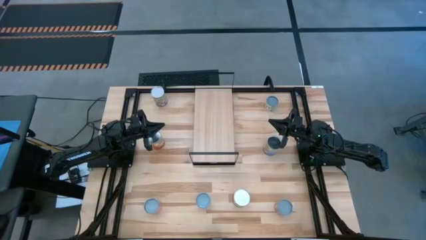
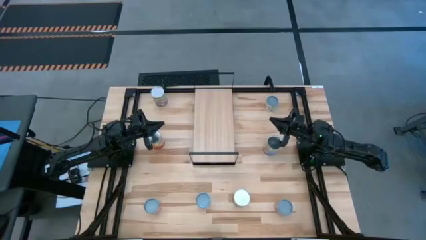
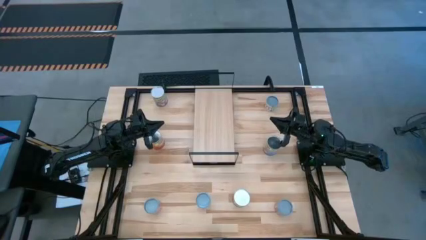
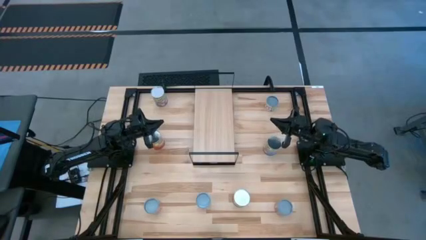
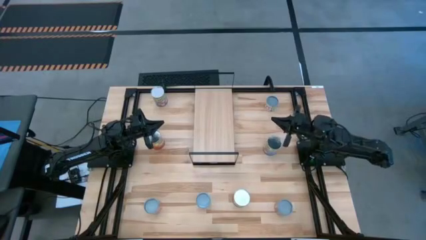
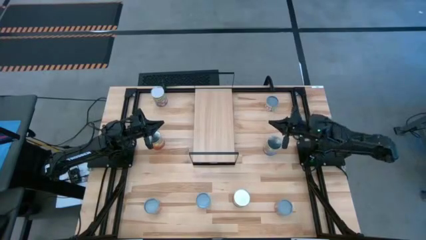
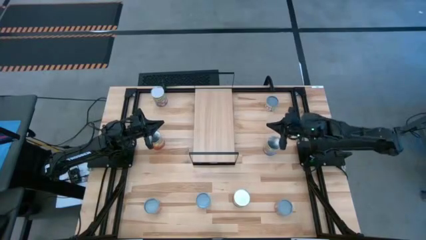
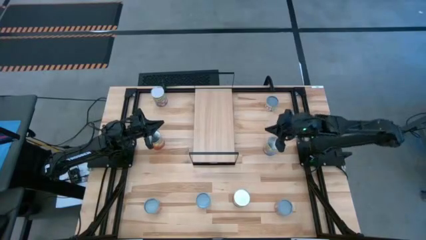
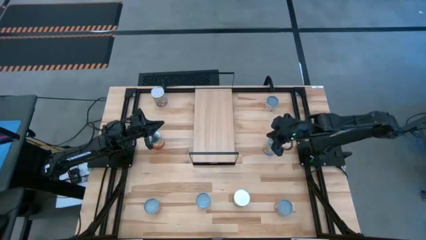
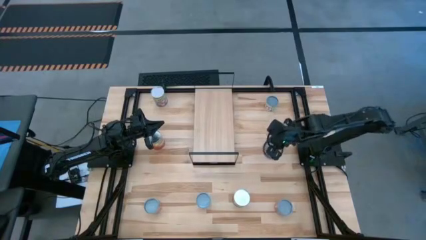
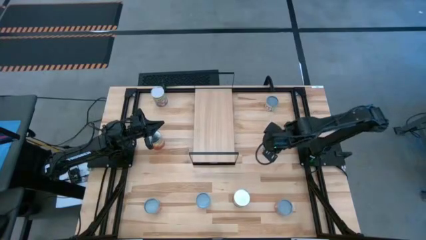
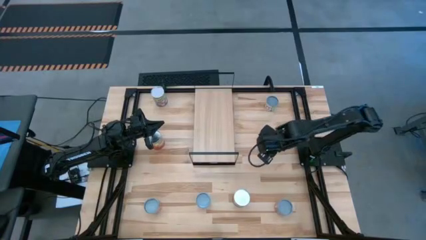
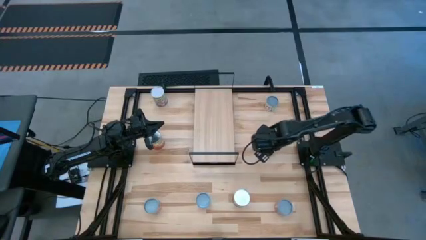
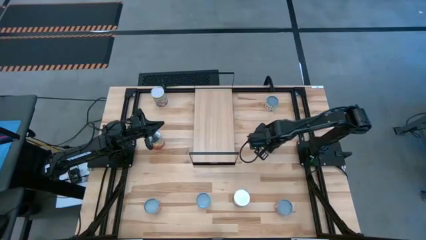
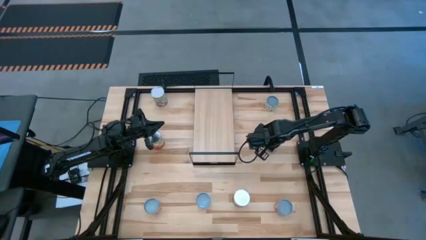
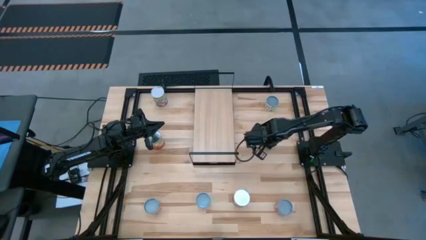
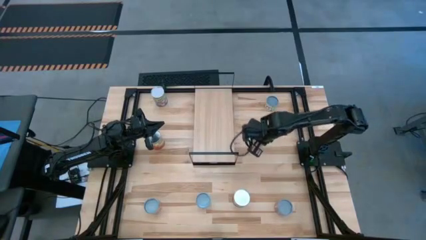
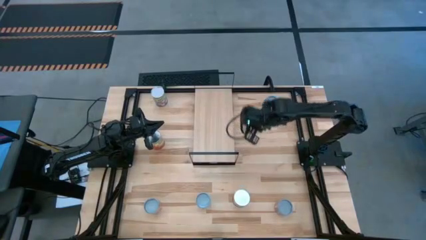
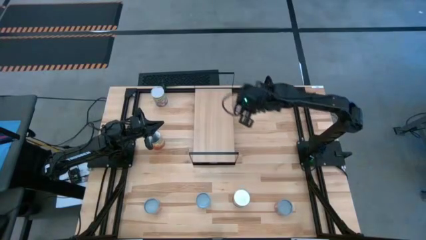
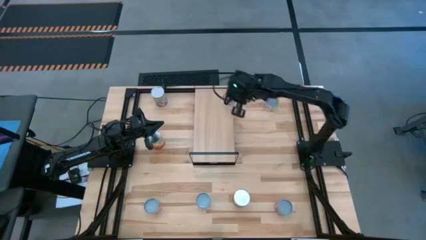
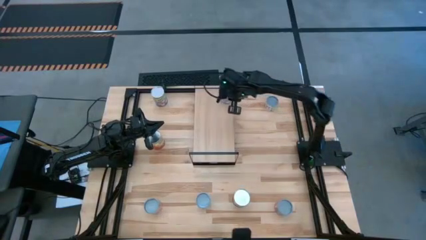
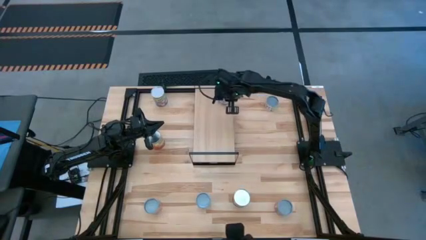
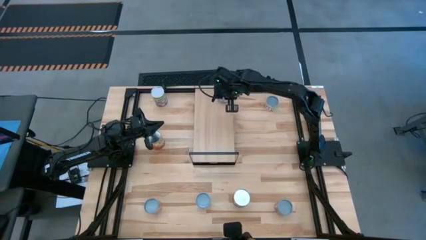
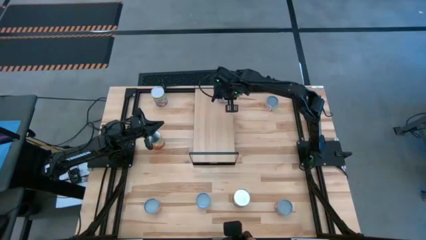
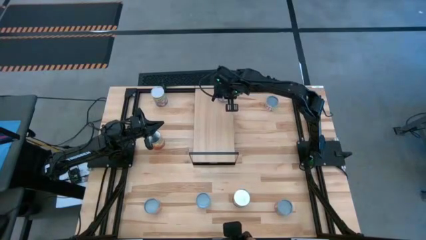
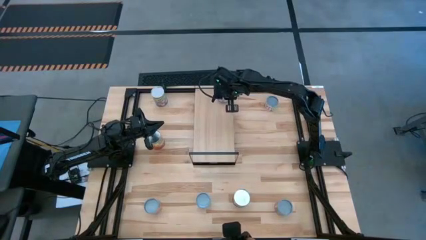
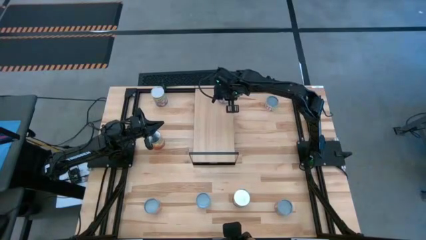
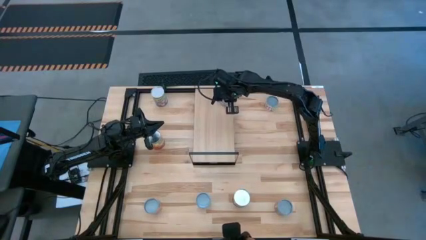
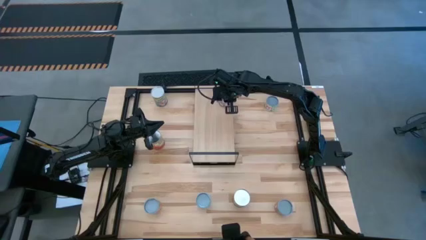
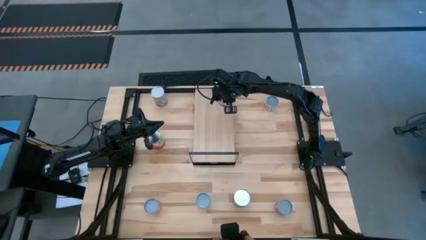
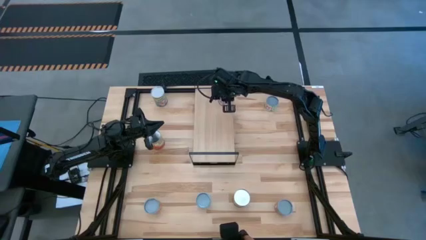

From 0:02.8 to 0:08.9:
Task: Pick and place cans onto a shelf
Put the right canned peaches on the shelf

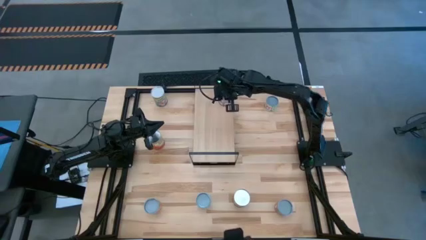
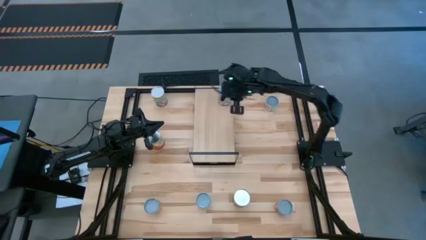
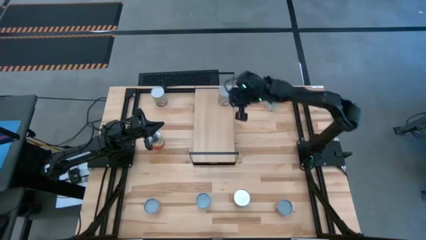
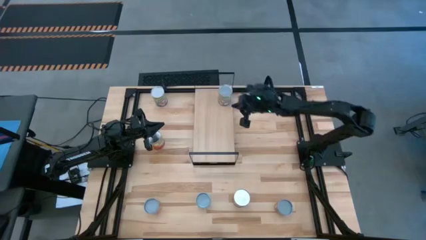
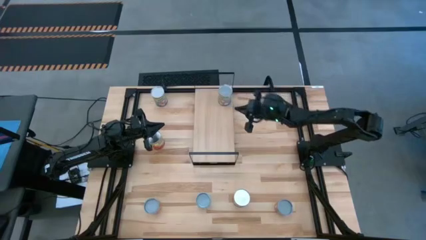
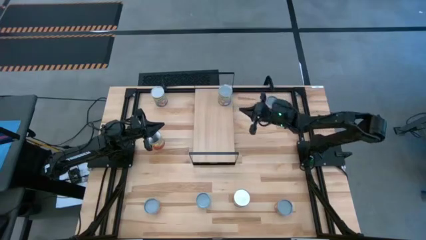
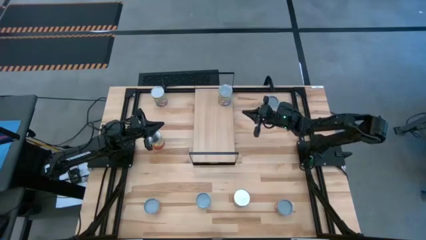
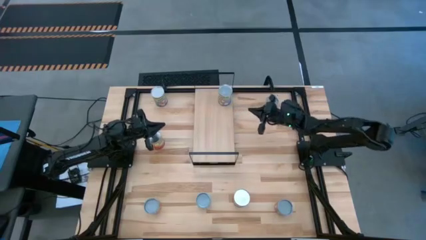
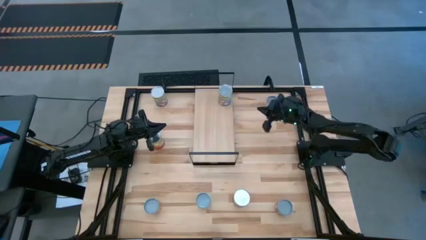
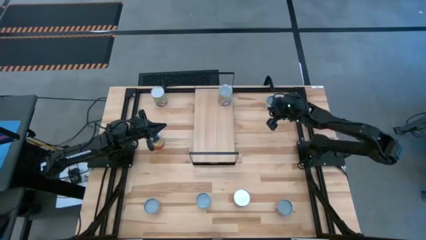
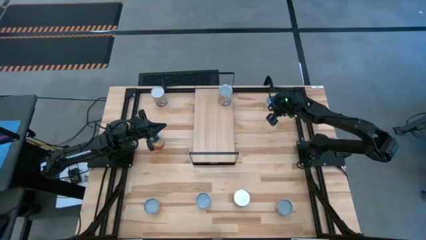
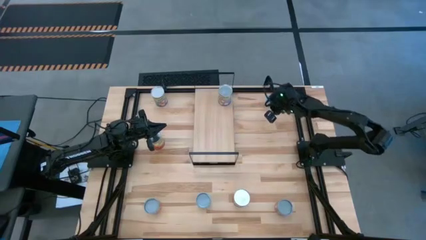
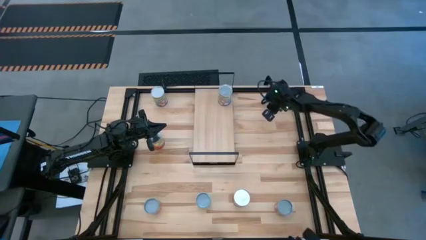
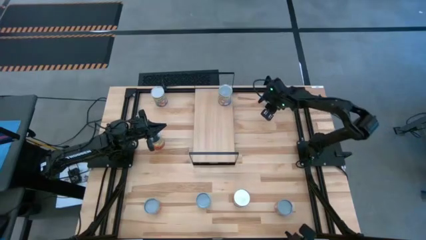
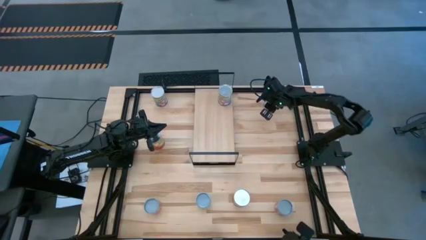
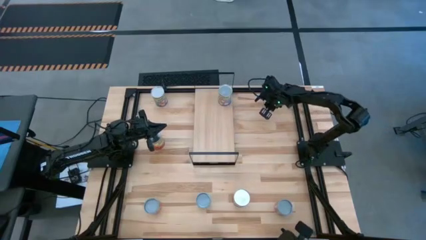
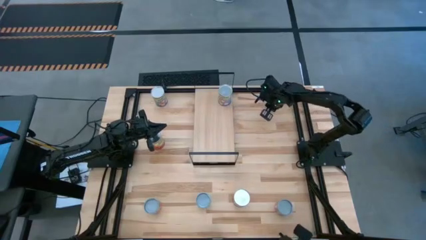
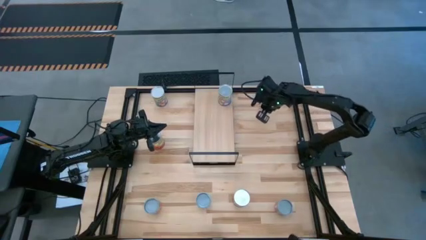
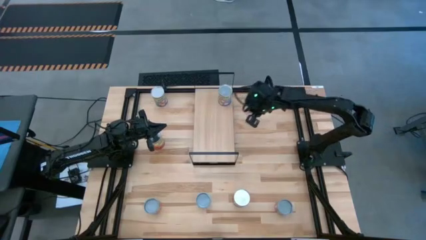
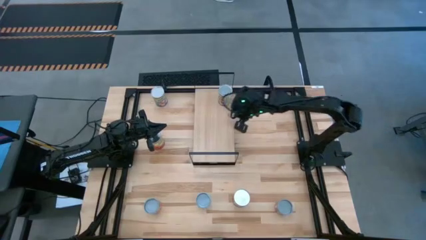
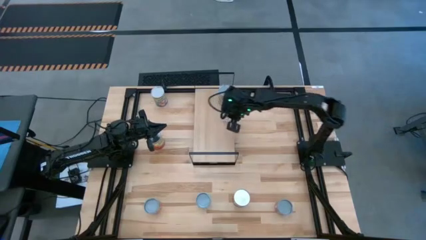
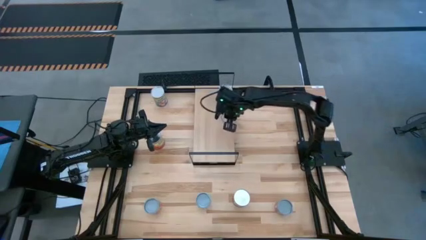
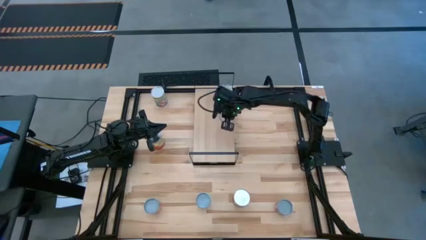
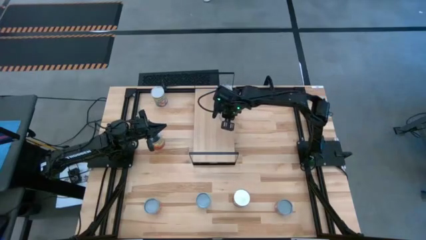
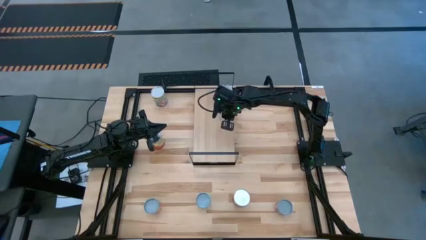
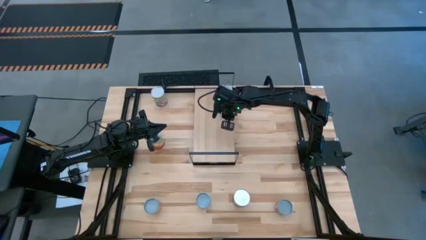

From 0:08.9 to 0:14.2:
Put the canned peas on the shelf

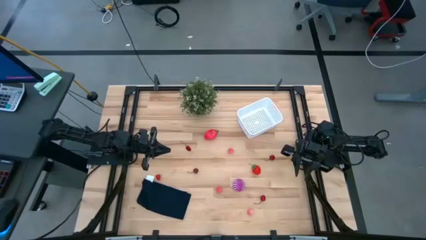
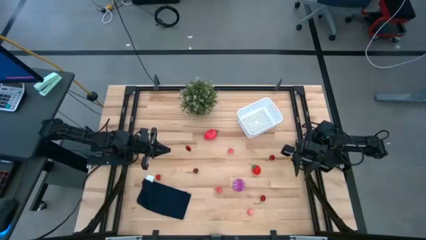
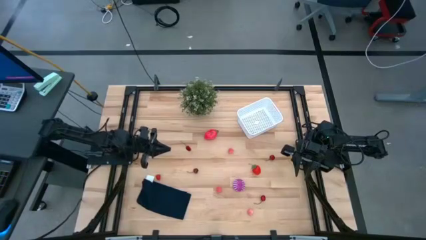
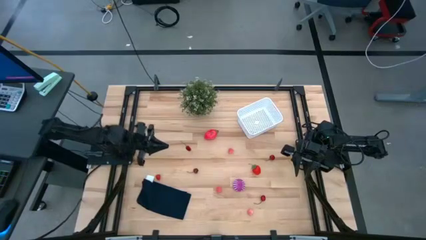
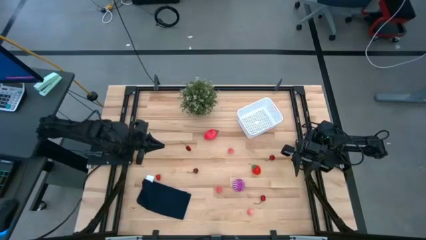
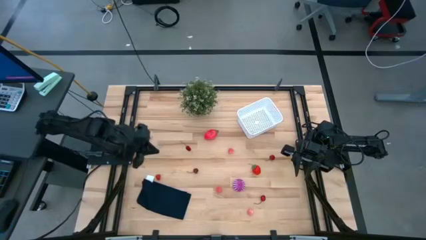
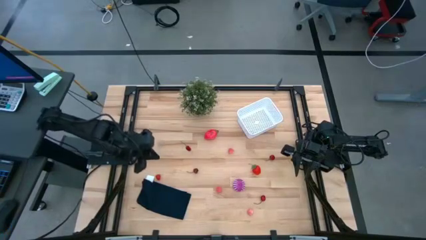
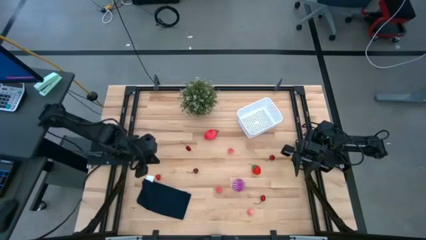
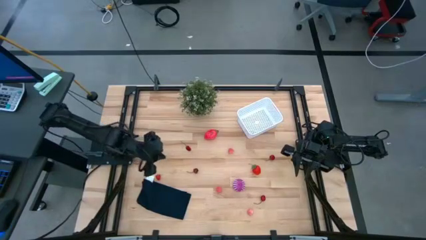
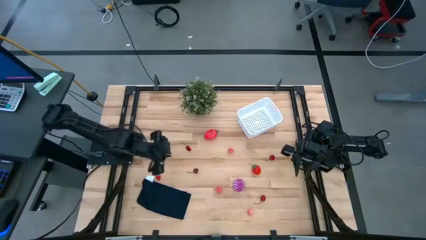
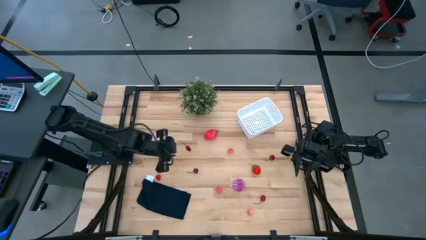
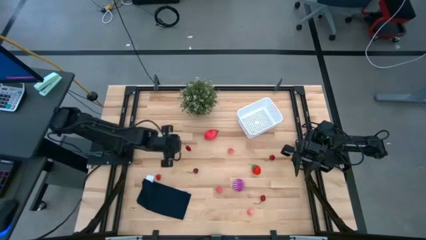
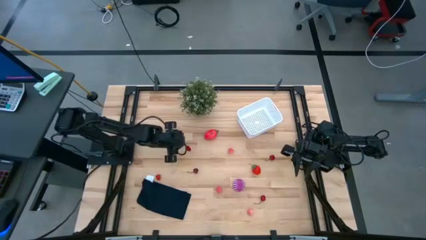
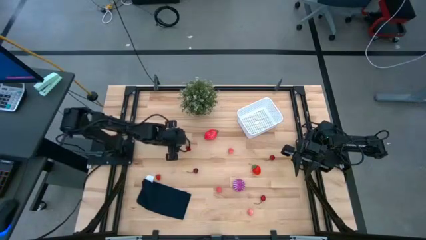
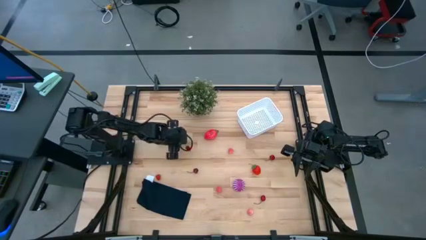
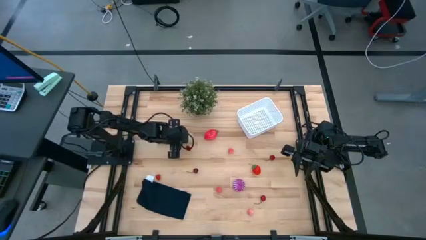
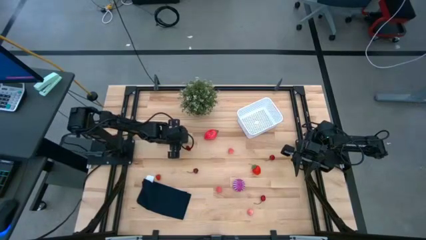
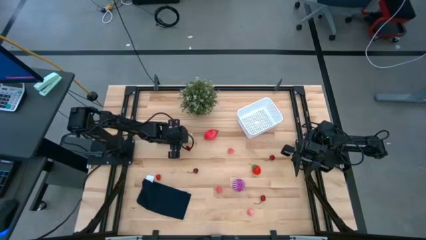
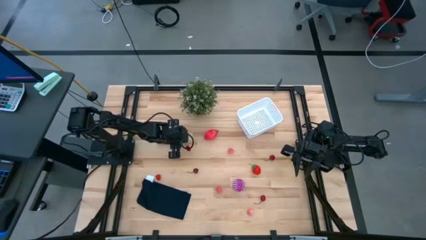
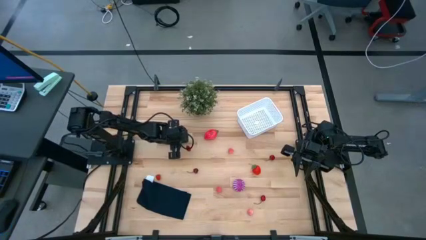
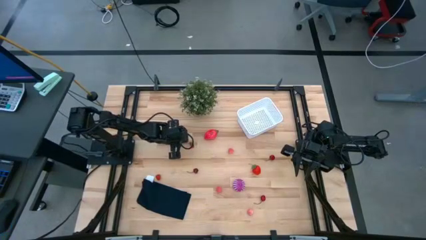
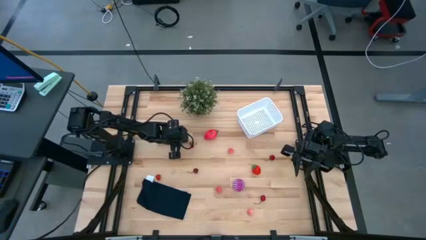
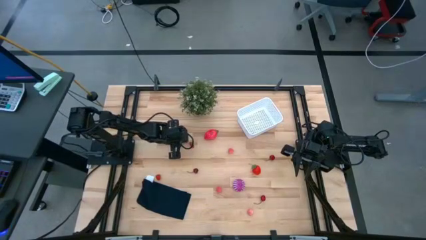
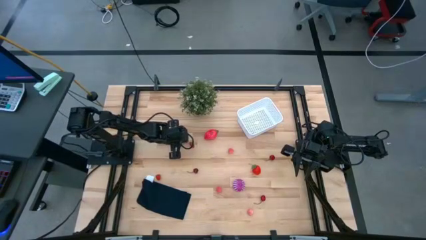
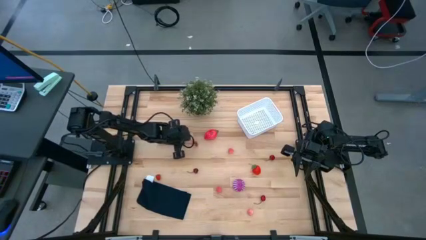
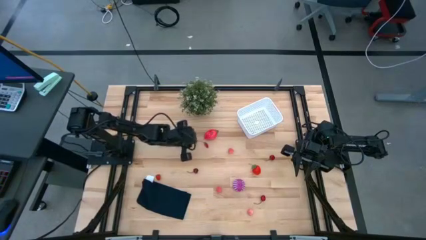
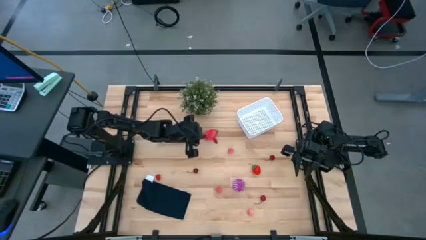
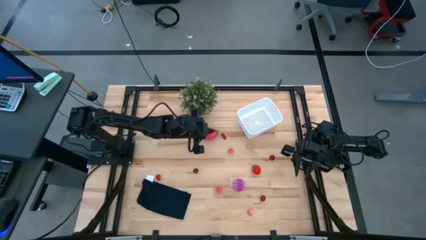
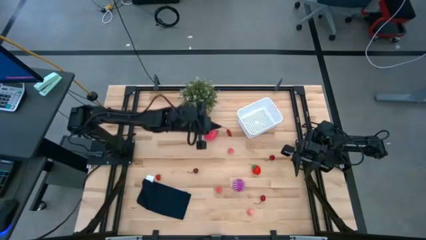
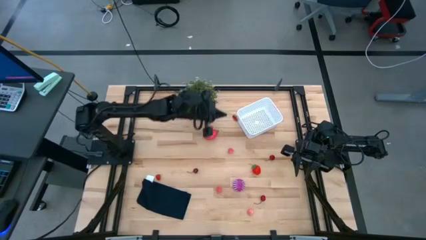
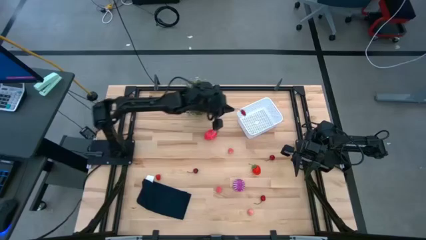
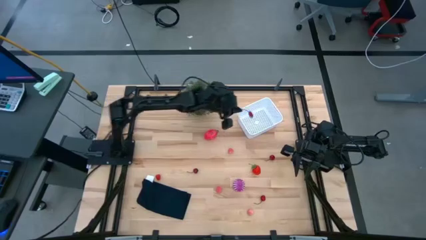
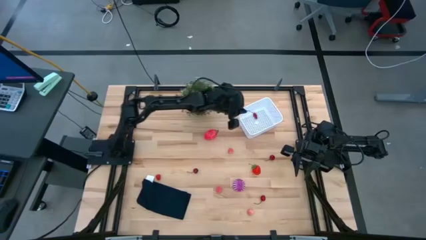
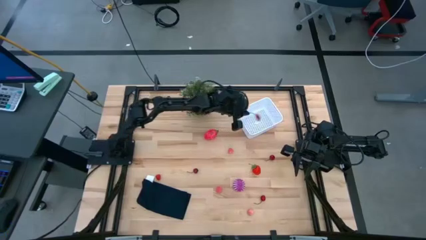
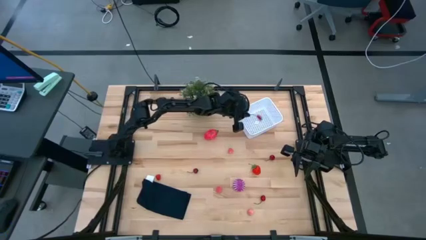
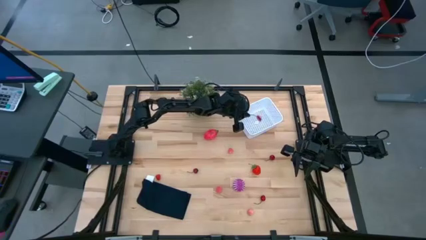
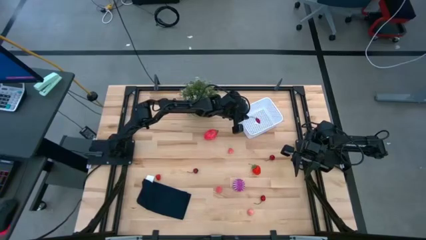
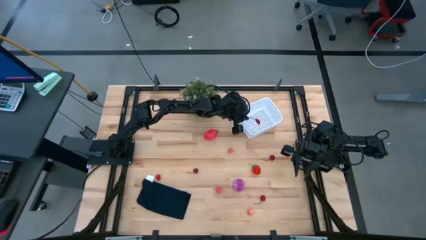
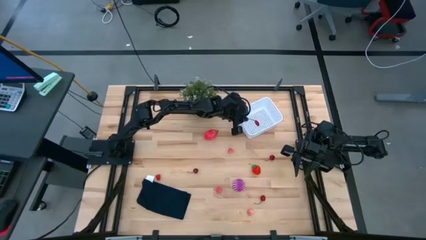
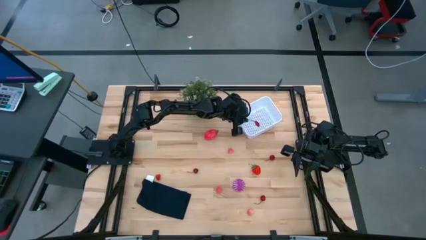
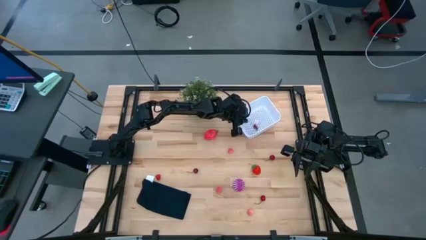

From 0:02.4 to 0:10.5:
Task: Pick and placing Produce into tupperware
Put the top left cherry into the bin
